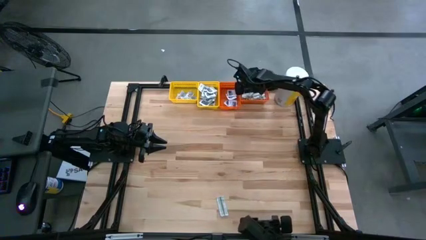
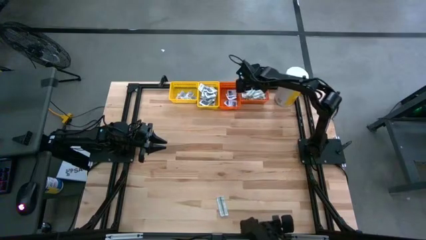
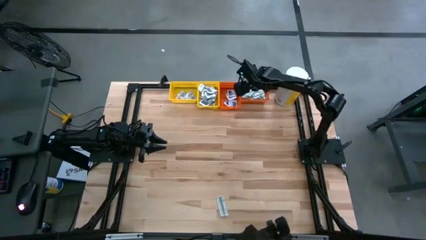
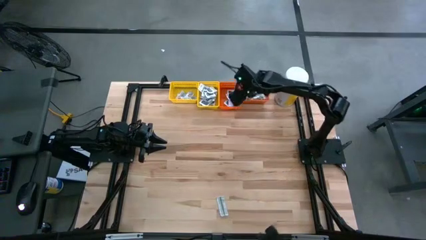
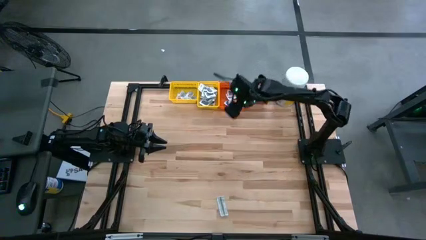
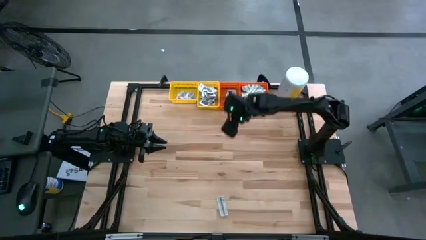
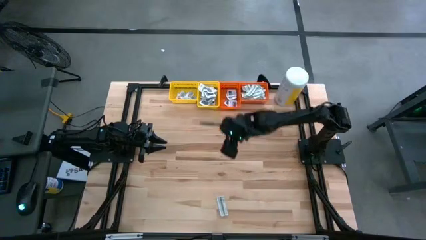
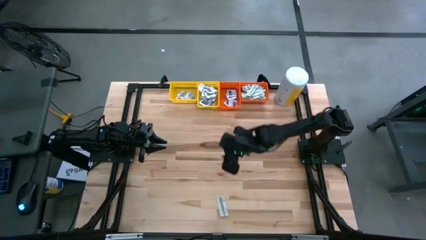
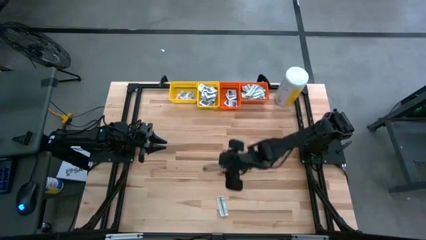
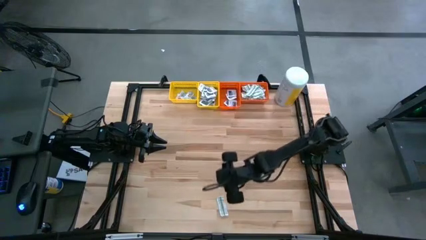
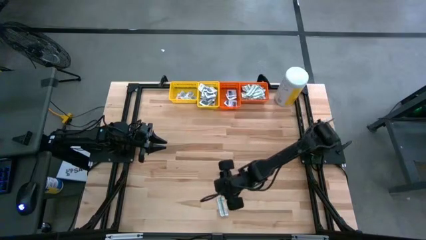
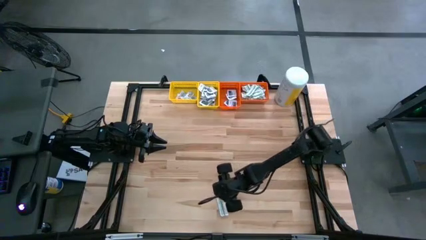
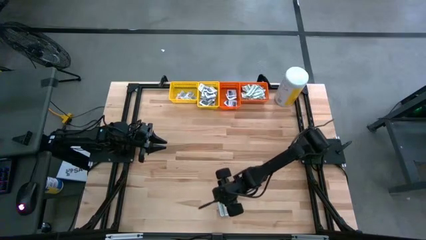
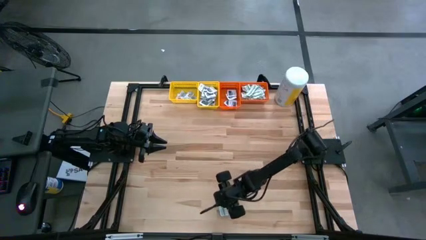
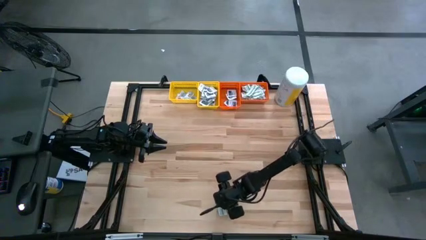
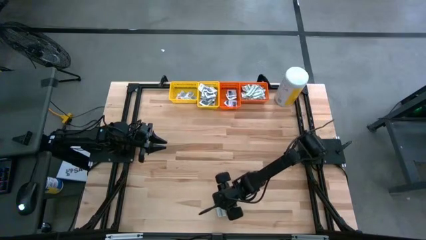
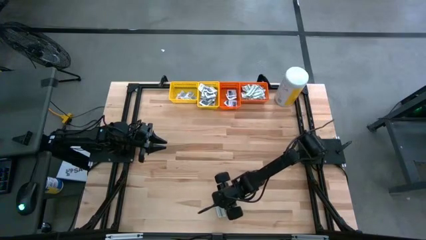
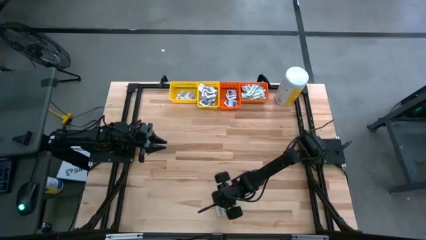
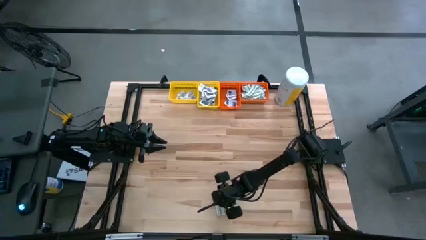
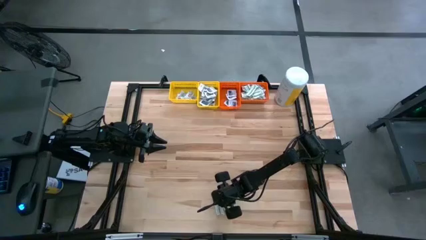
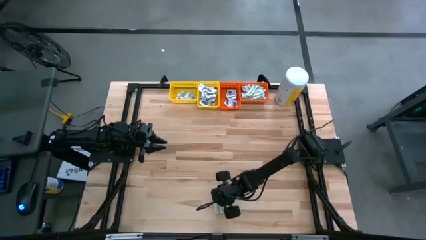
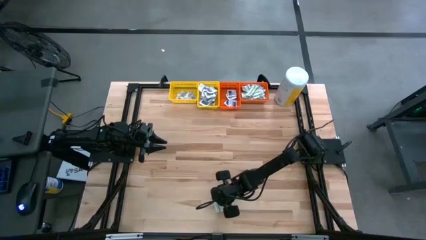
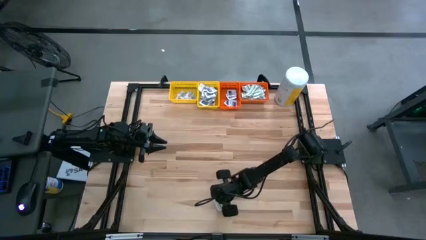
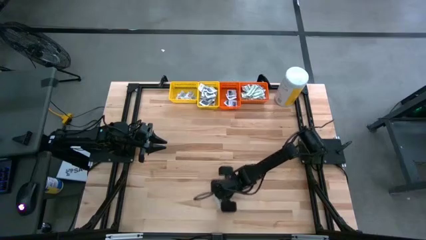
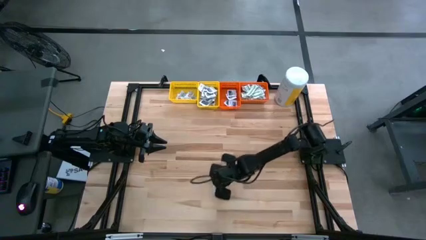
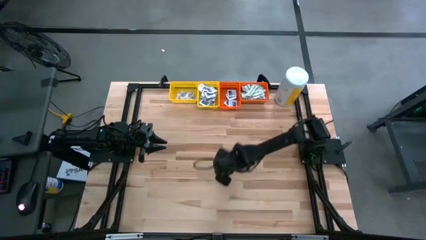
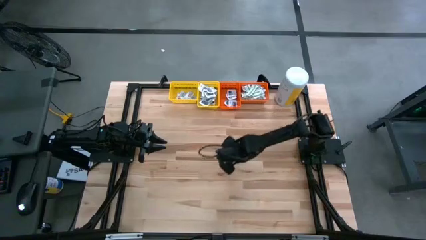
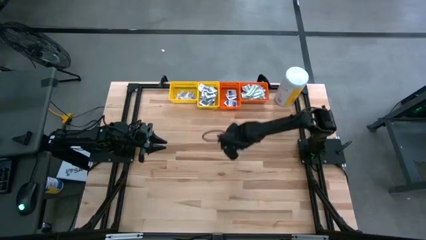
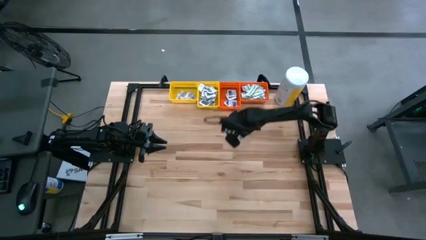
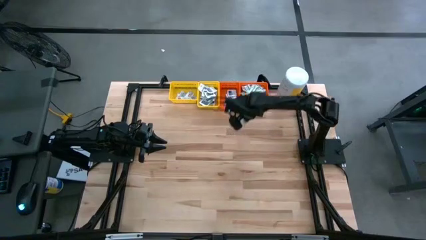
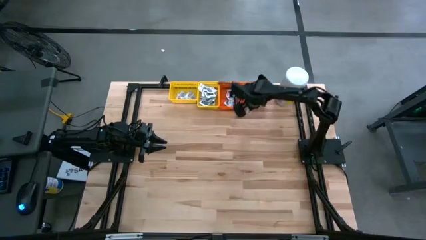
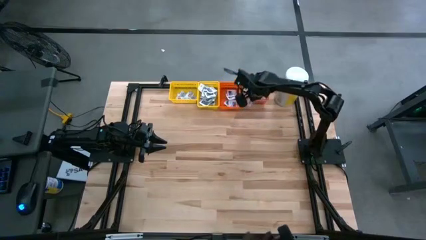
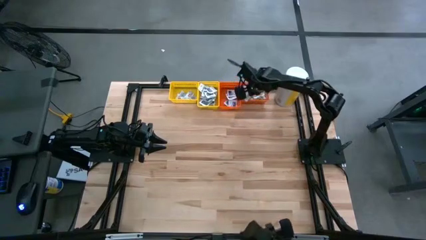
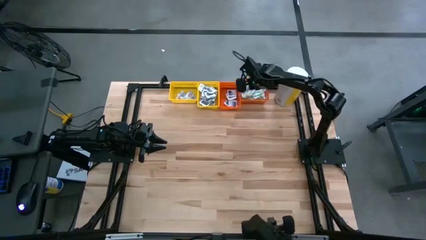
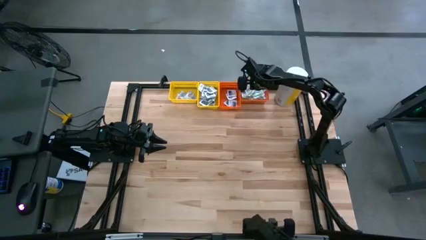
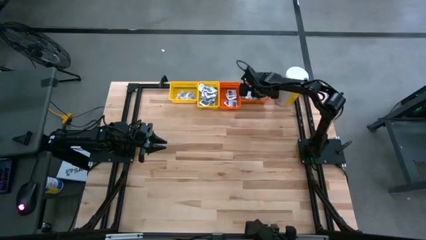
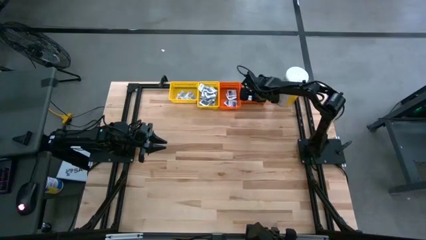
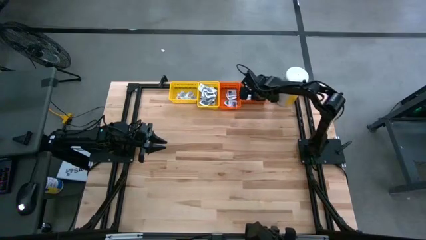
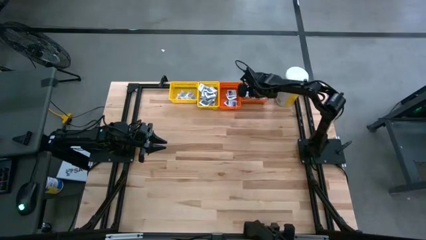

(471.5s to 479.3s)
Task: Pick & Place First Aid Supplies
Put the green pad into the right orange bin

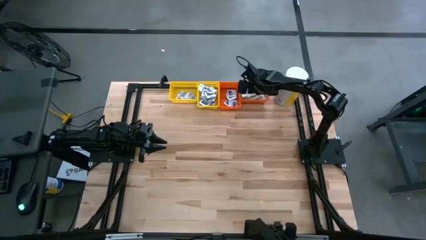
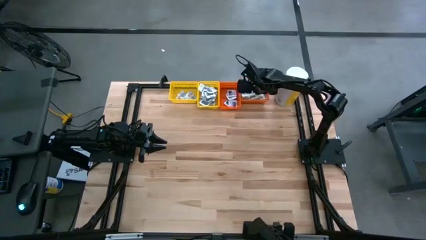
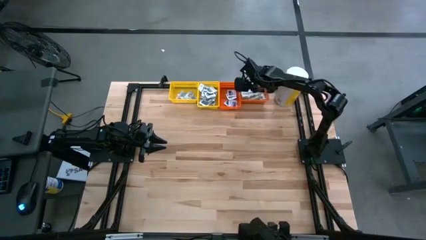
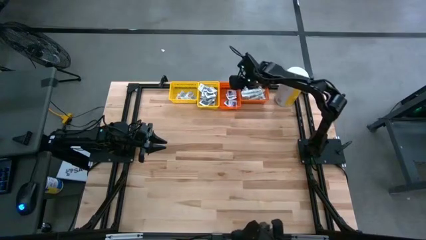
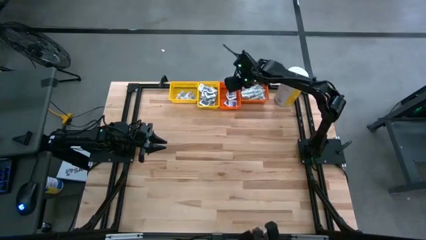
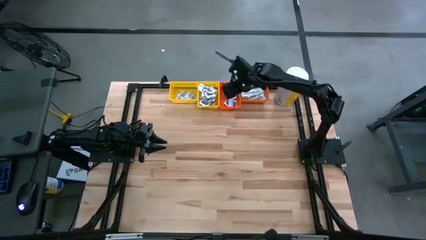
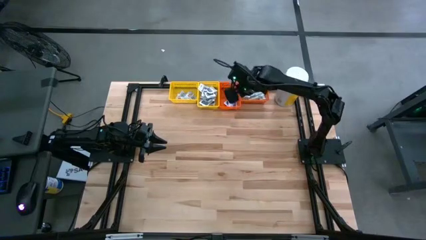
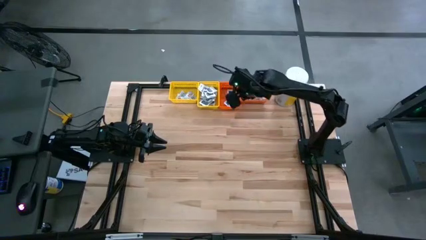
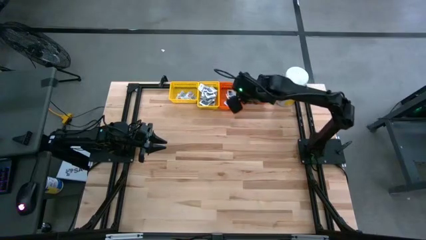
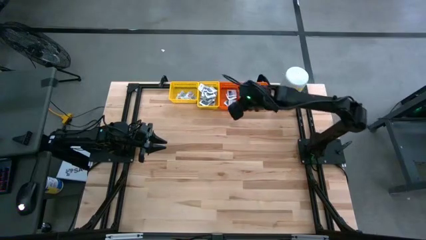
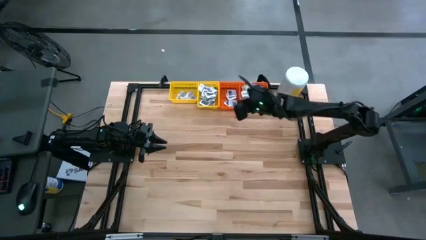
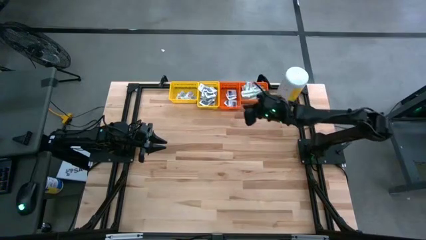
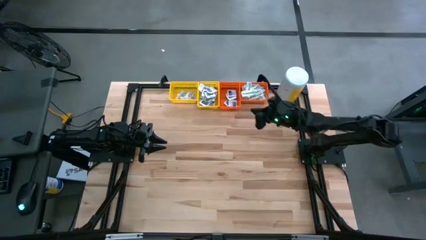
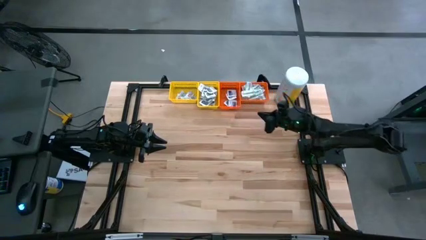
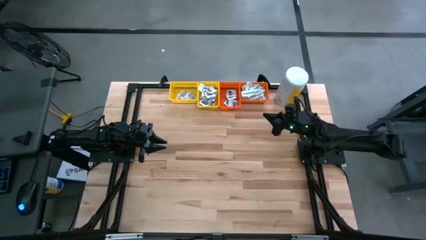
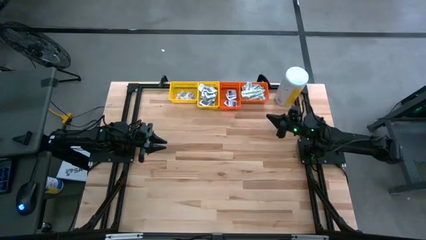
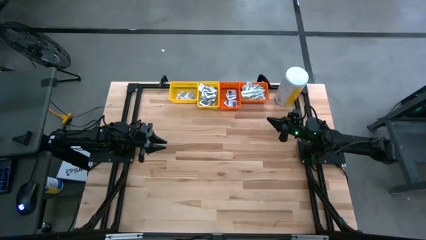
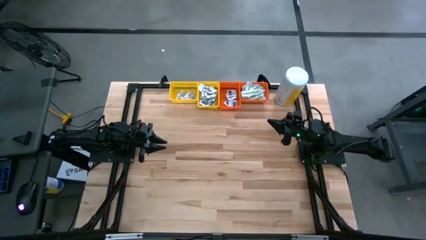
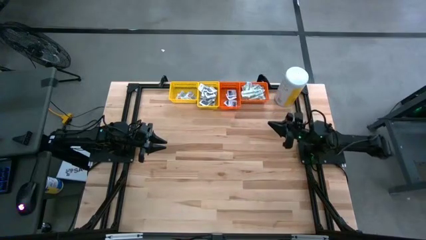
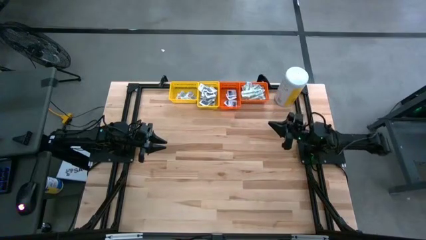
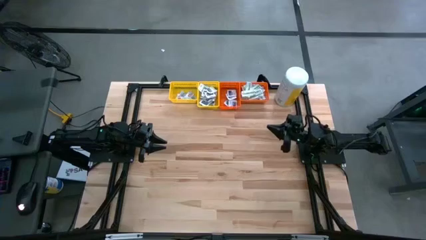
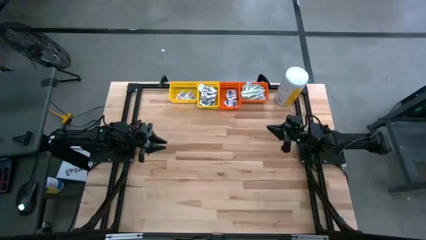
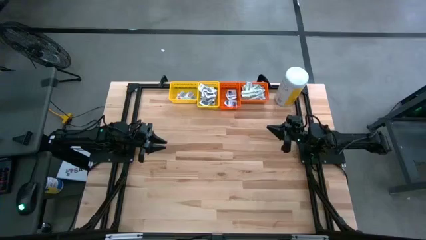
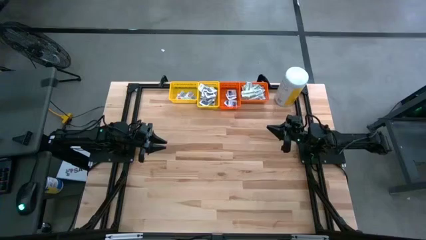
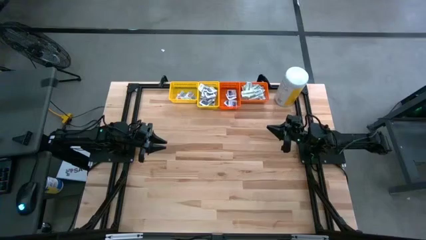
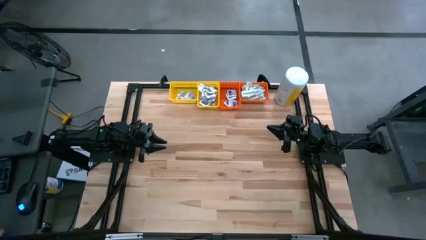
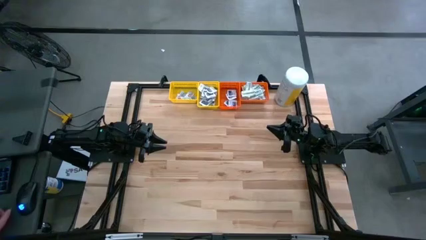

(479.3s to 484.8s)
Return to Home Position

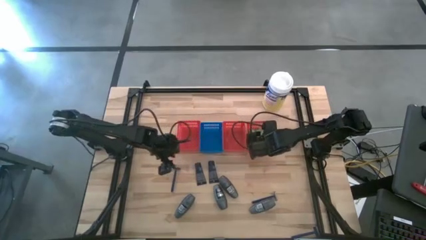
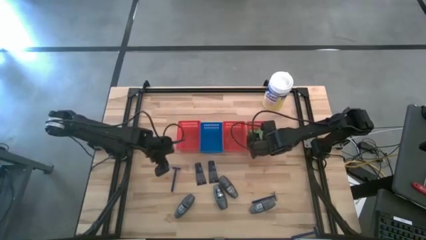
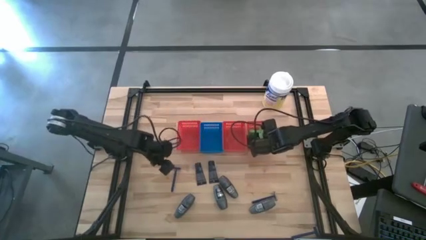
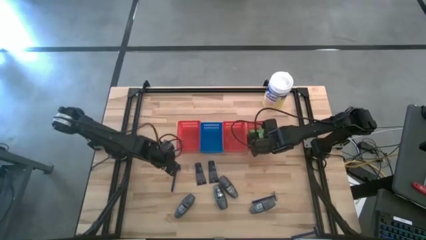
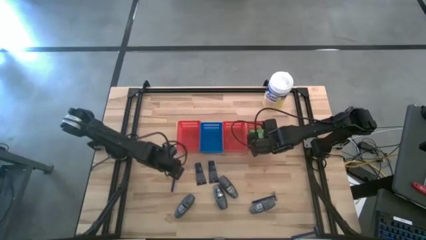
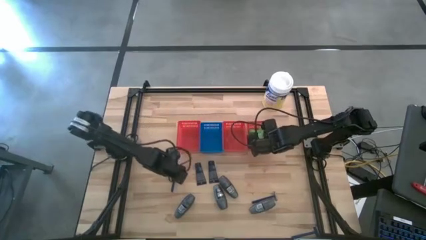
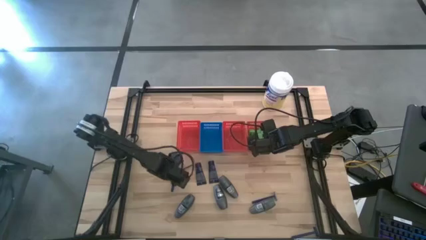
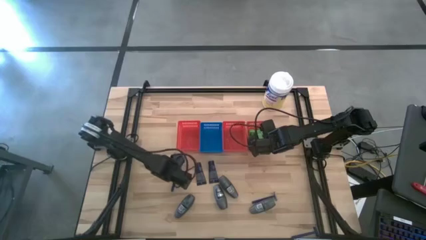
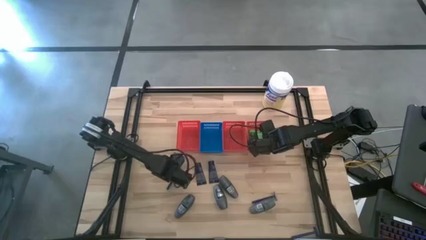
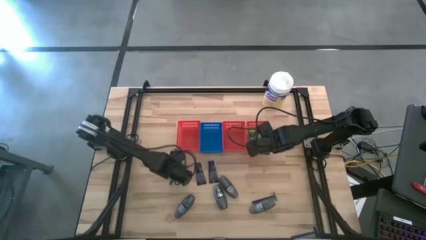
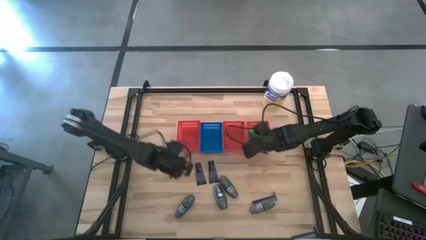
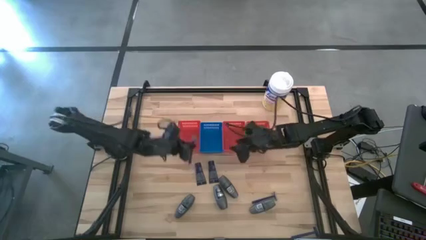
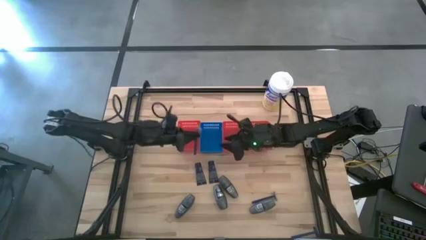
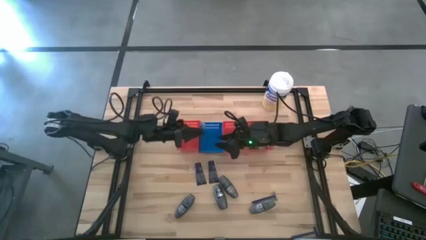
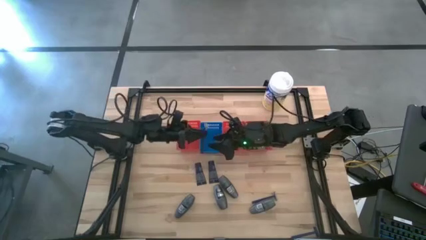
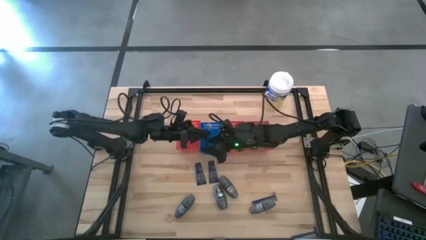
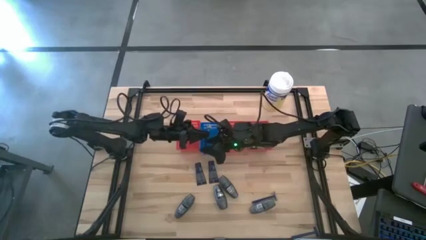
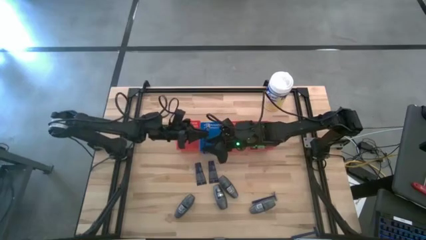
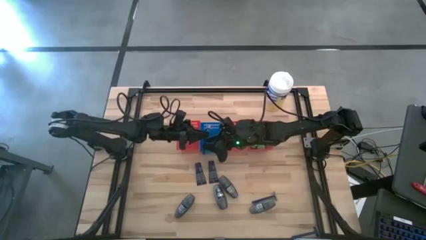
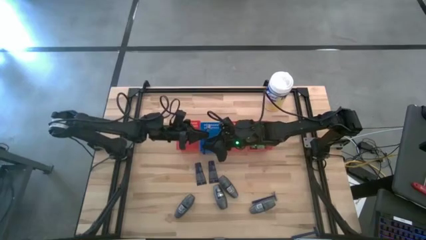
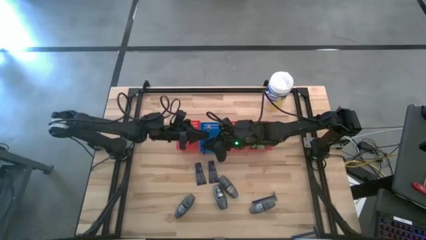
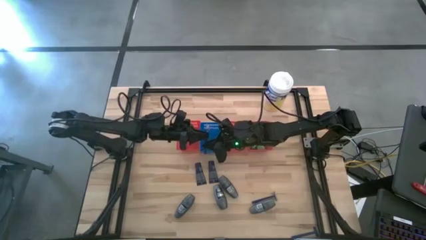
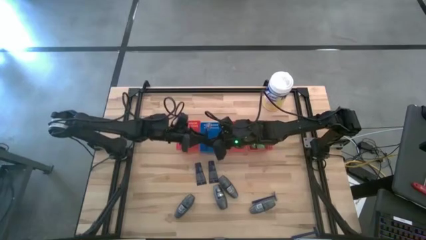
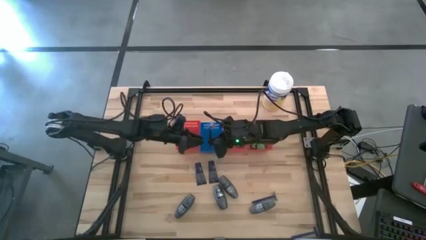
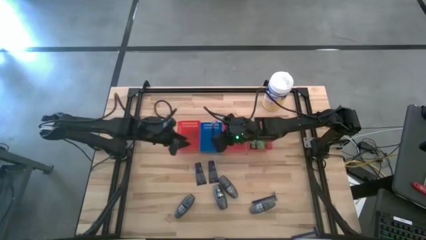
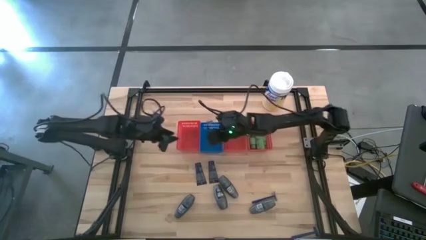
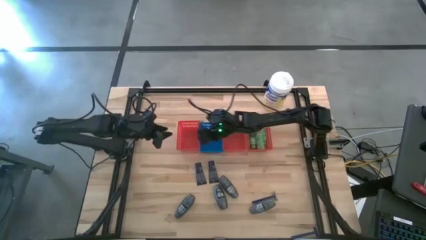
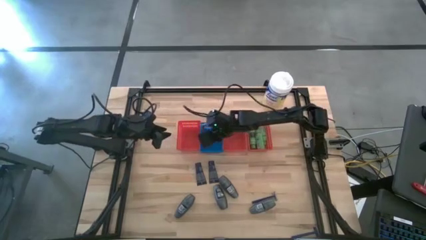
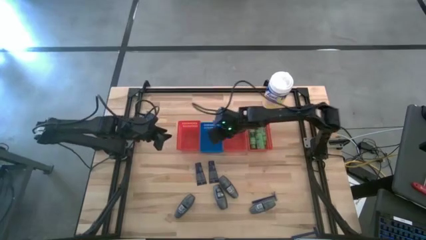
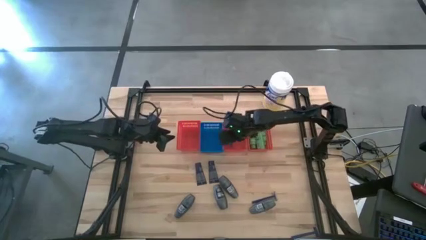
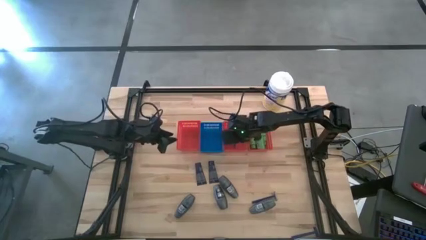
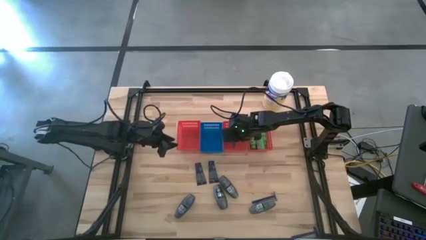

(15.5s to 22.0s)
Task: Pick & Place Travel size toiletries
Put the blue razor into the middle red basket
